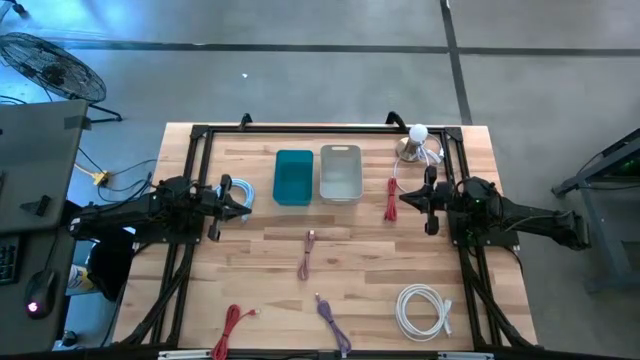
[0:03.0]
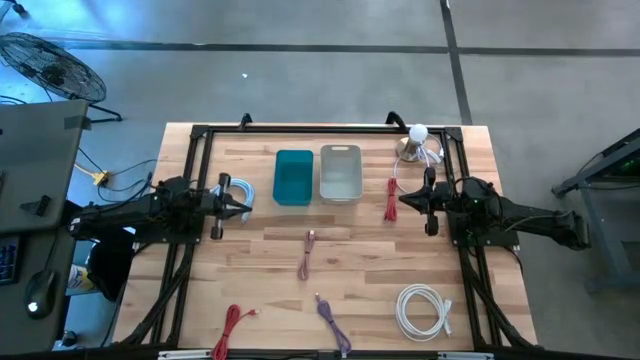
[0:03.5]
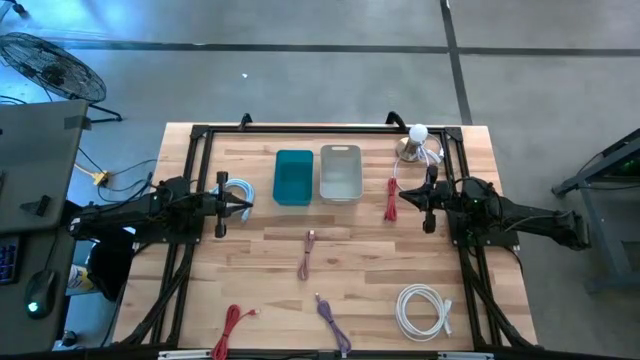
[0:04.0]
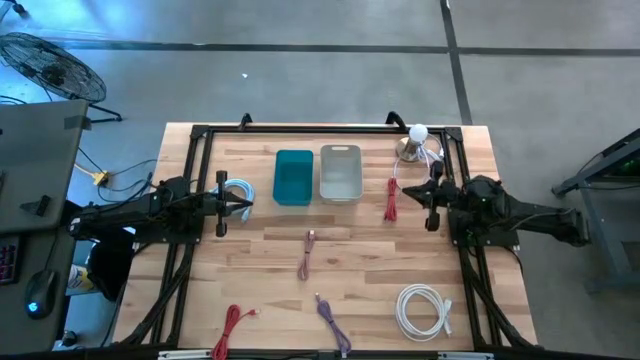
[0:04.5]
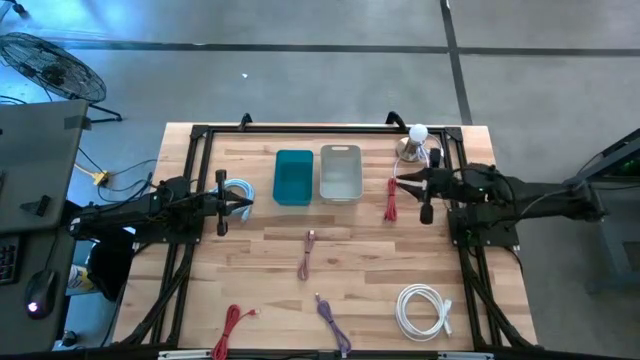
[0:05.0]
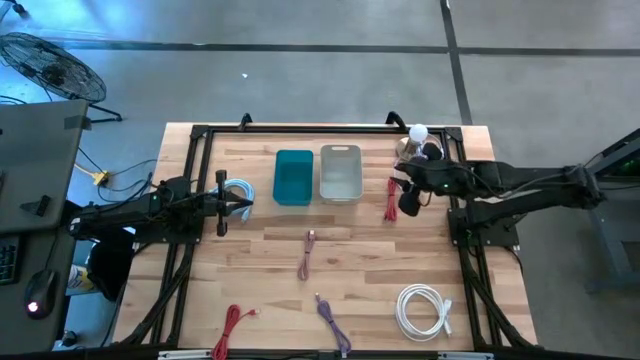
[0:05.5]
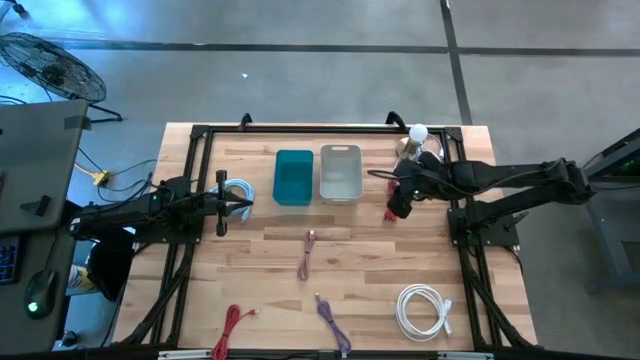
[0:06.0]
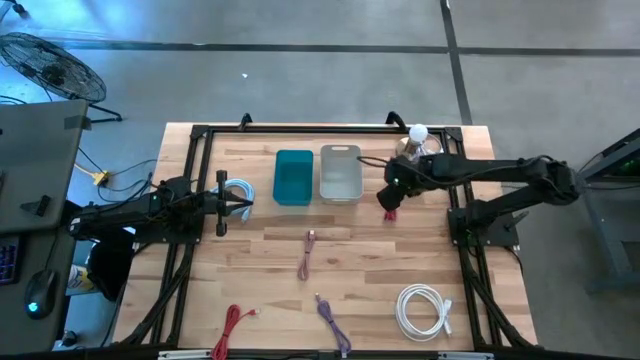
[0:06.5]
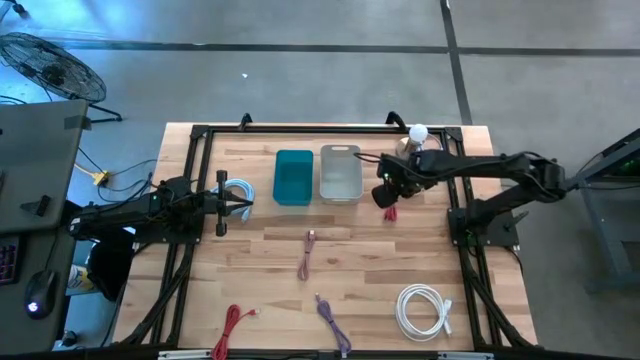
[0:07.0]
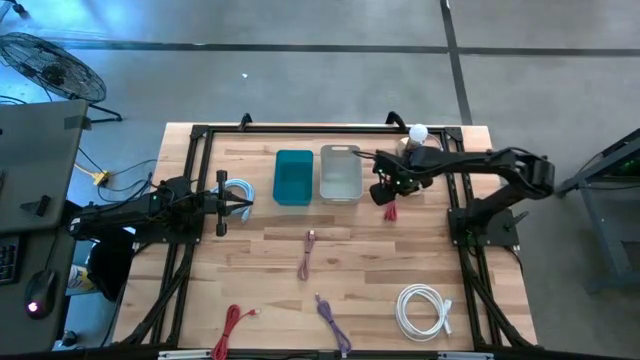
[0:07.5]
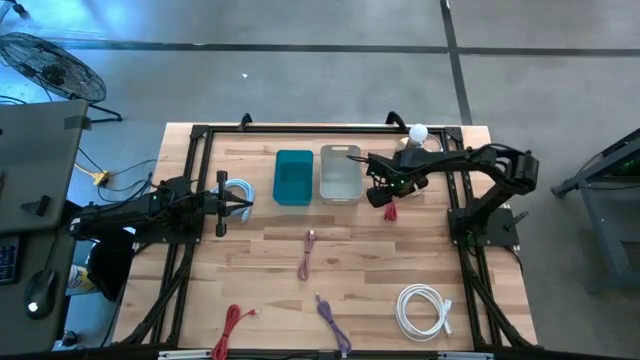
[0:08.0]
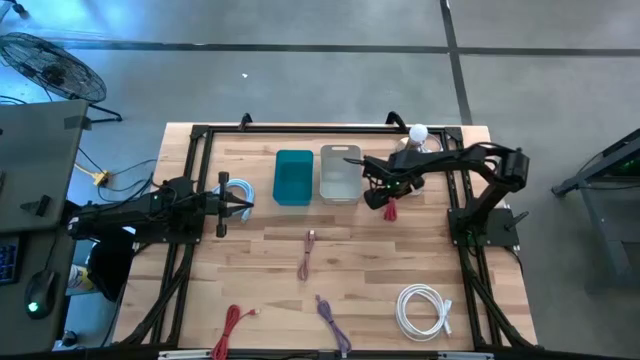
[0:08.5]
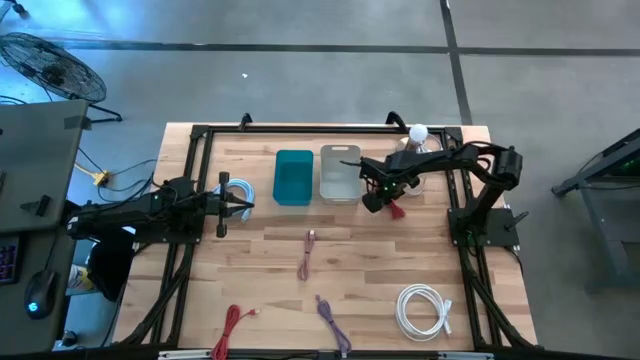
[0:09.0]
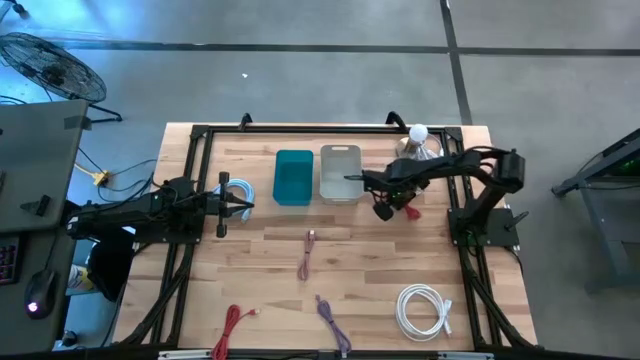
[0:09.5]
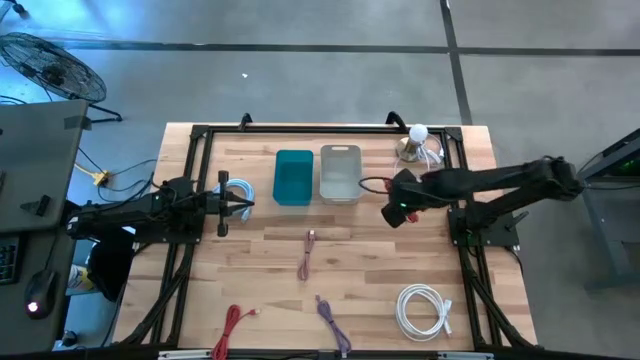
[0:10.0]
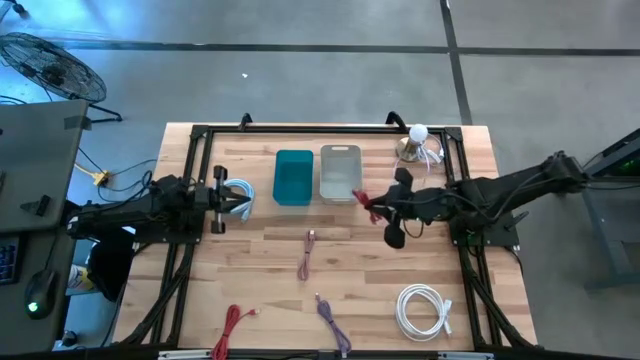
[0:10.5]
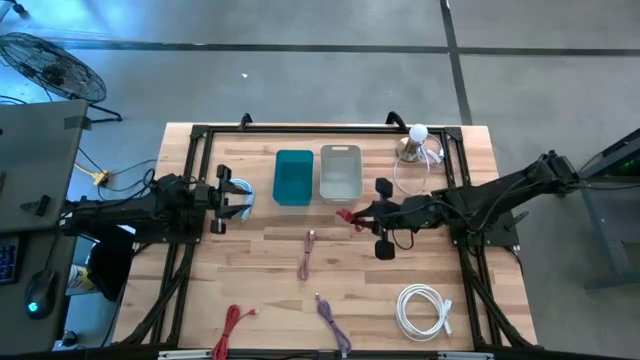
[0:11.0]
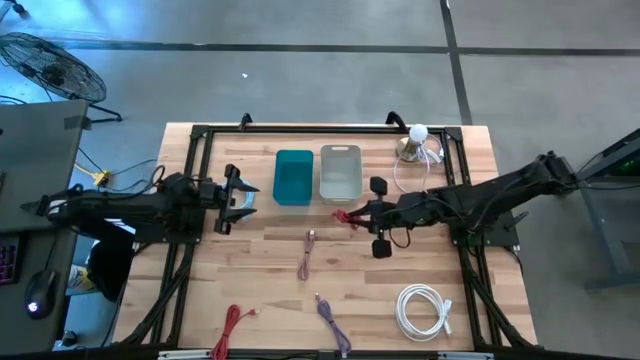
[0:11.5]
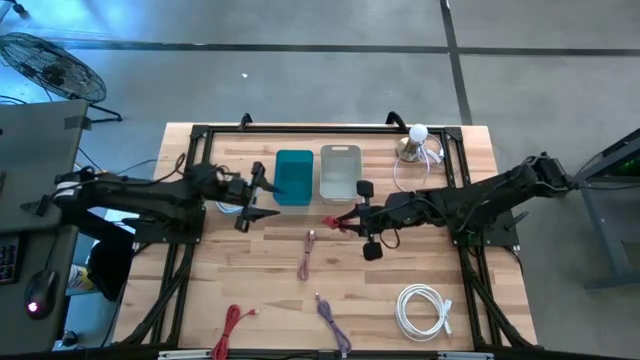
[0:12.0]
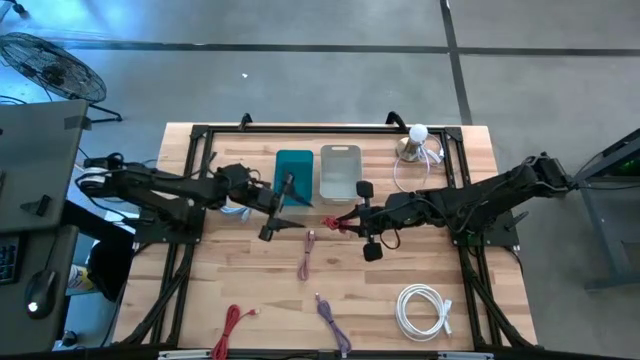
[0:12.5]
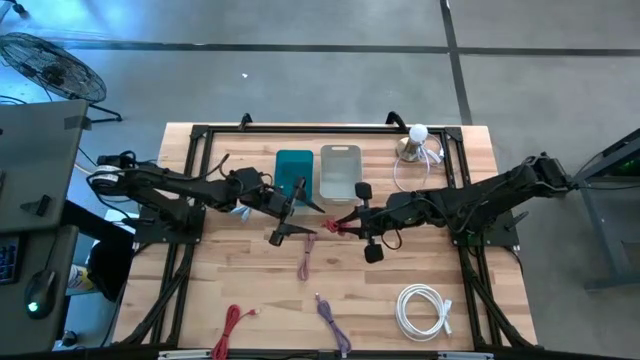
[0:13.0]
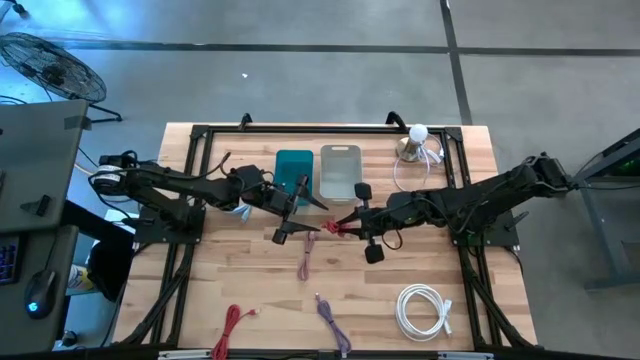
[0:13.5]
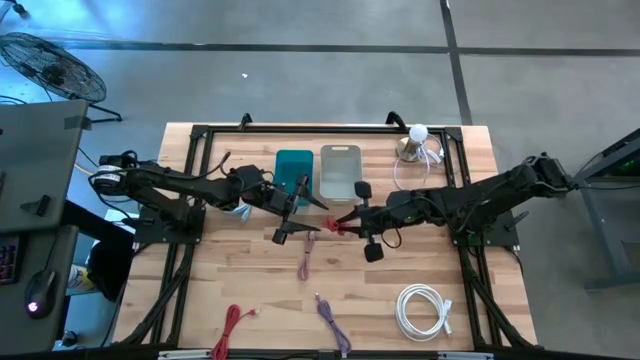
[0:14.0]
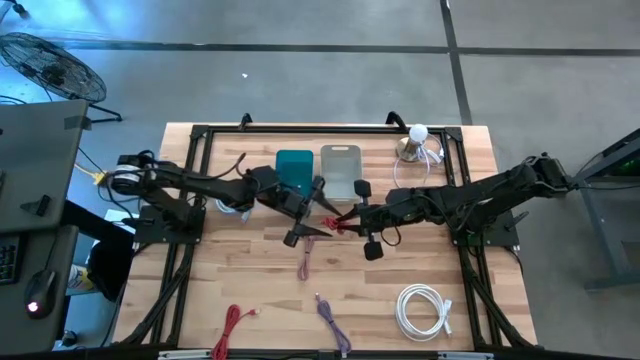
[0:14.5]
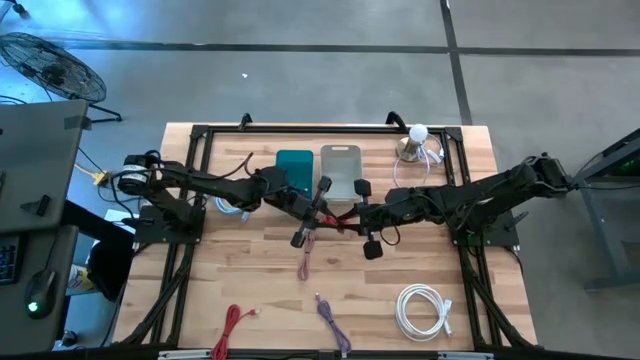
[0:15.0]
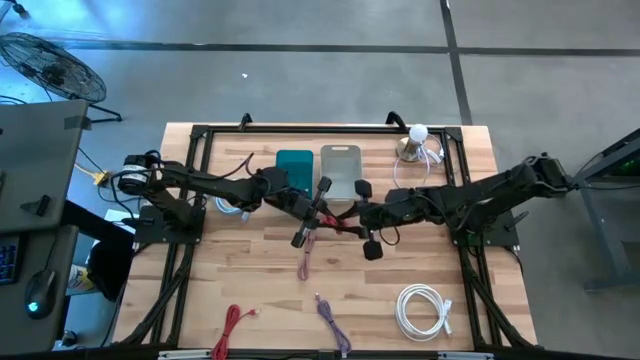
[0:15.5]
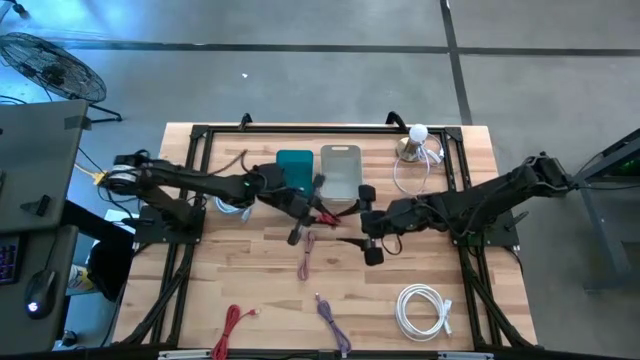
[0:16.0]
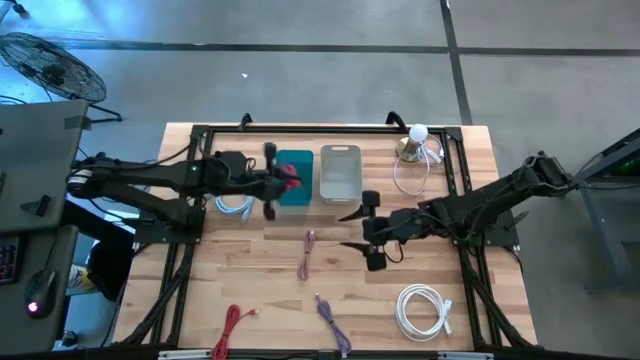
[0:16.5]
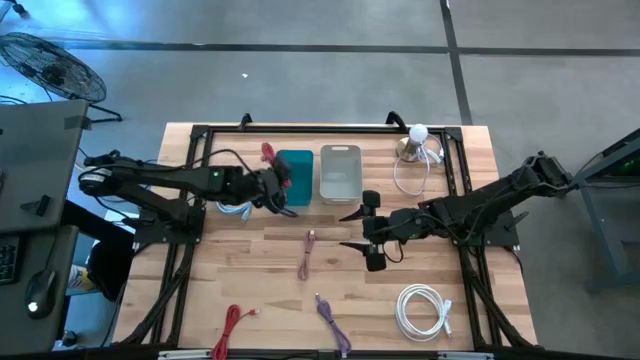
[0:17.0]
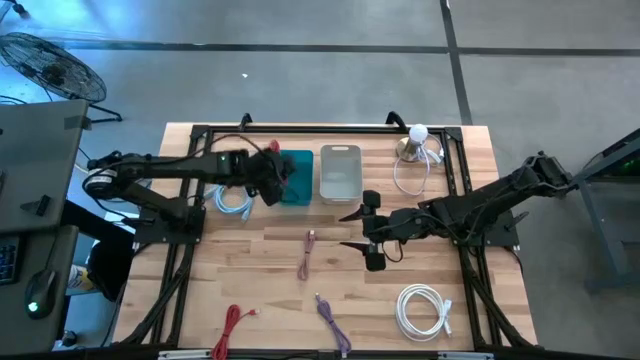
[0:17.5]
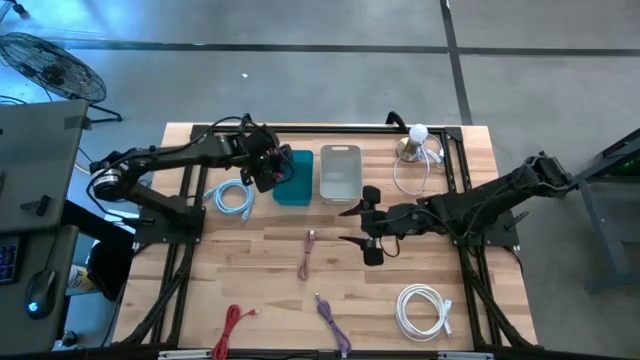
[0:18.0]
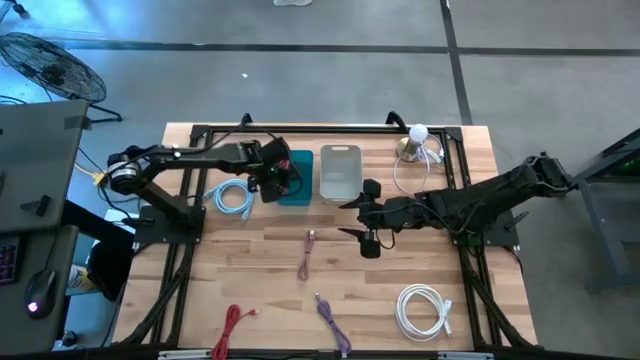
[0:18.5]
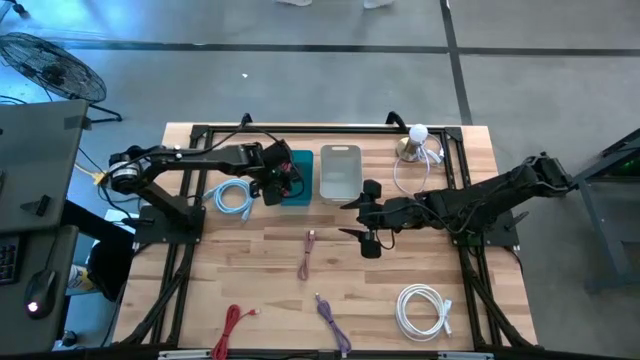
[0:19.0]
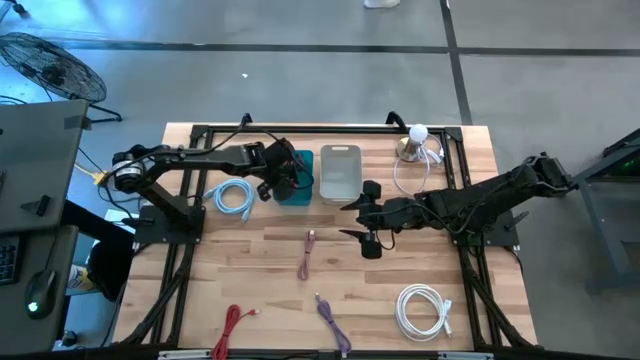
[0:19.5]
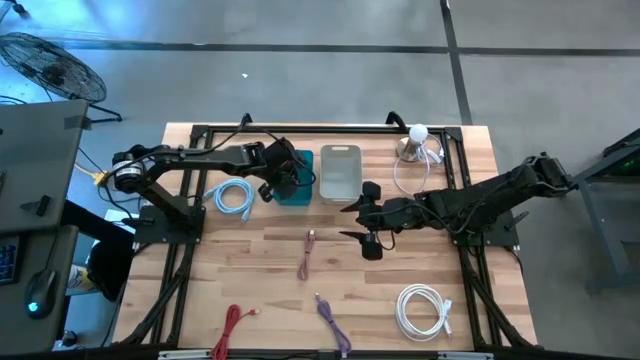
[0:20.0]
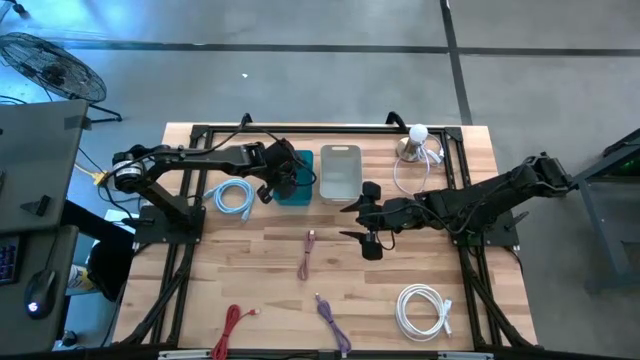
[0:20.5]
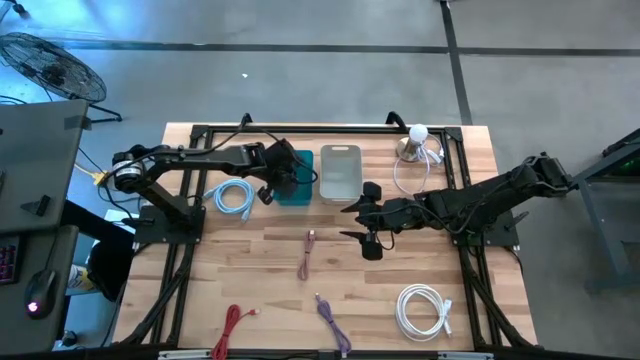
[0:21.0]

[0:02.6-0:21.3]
Task: Pick & Place USB Port
Put the top charger cable into the blue bin
